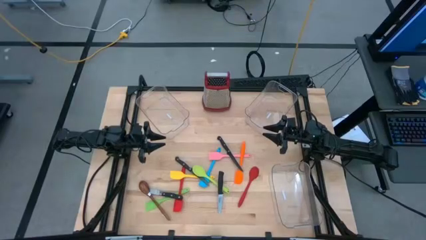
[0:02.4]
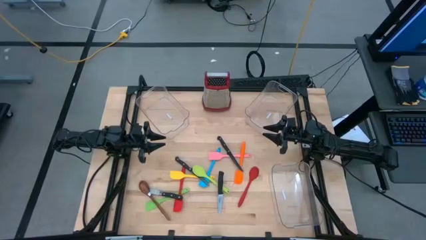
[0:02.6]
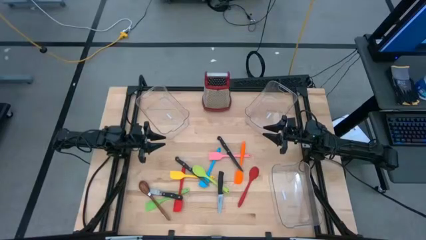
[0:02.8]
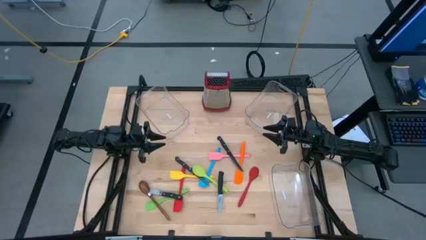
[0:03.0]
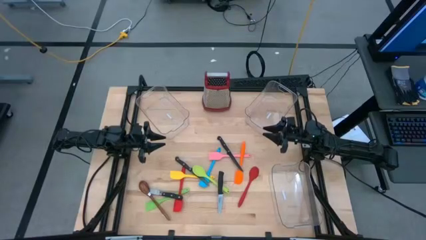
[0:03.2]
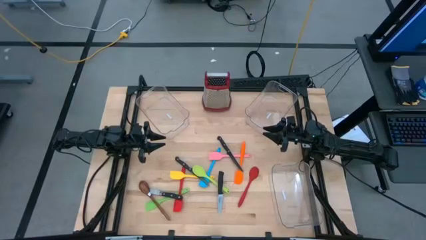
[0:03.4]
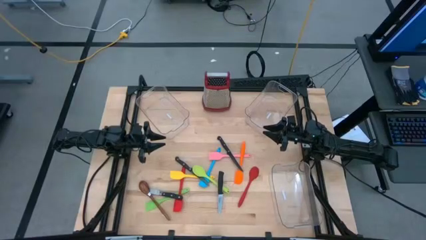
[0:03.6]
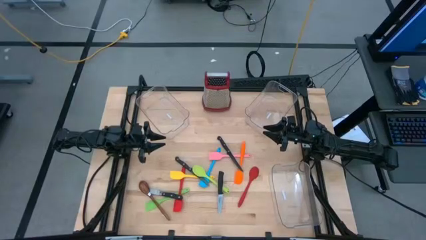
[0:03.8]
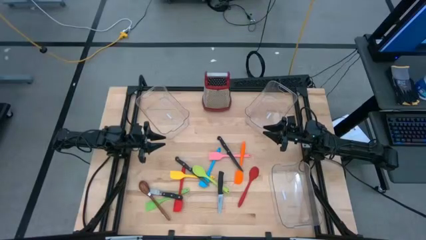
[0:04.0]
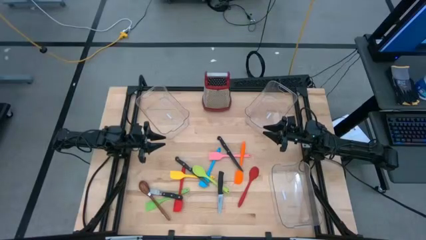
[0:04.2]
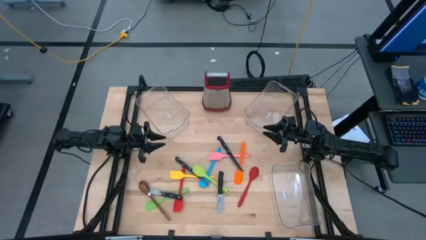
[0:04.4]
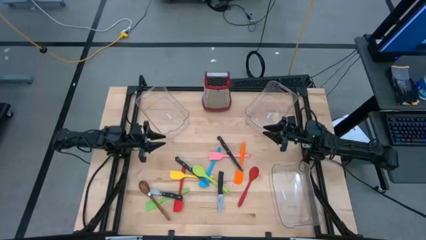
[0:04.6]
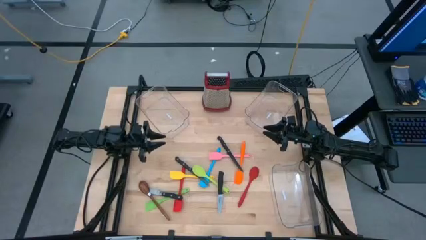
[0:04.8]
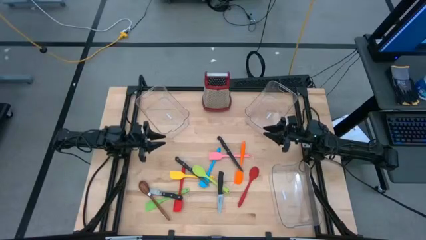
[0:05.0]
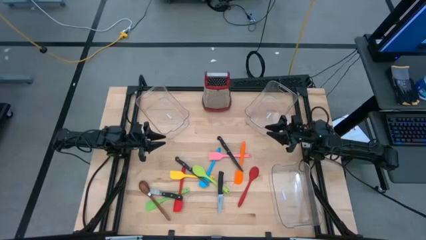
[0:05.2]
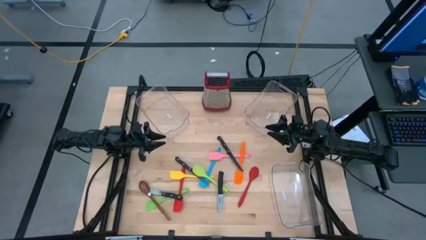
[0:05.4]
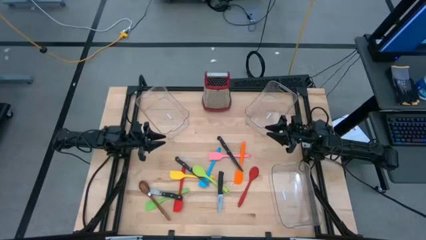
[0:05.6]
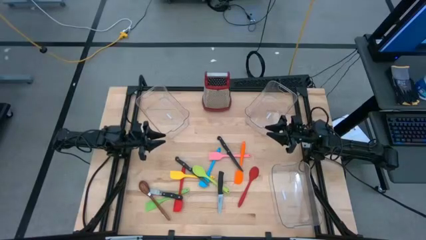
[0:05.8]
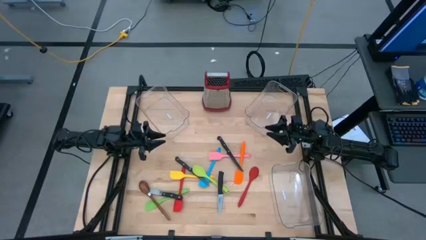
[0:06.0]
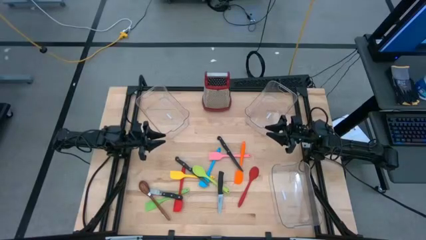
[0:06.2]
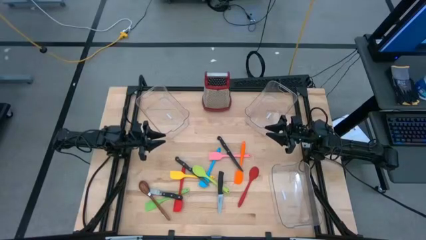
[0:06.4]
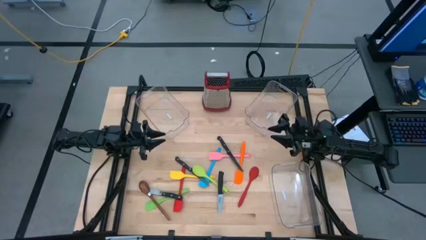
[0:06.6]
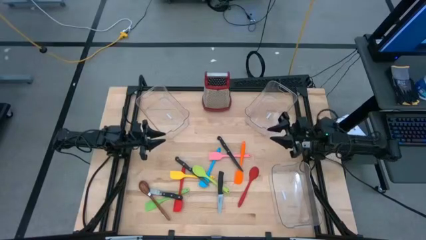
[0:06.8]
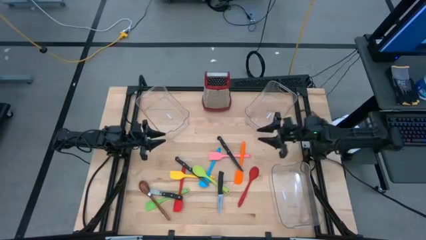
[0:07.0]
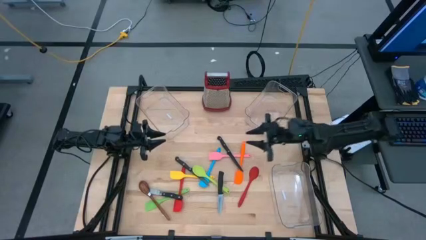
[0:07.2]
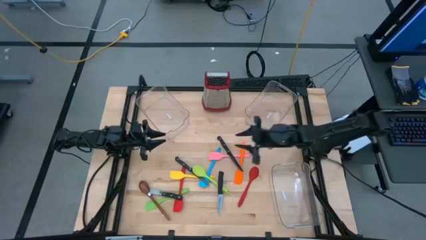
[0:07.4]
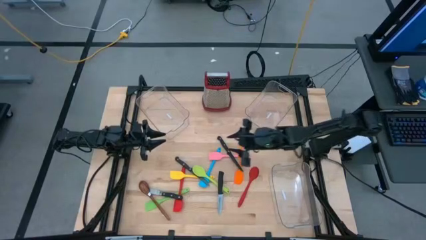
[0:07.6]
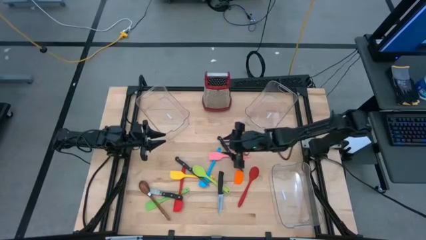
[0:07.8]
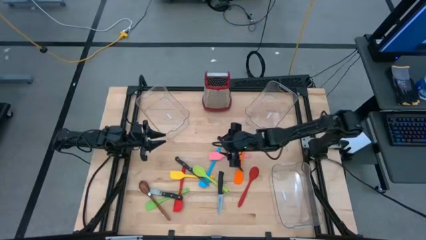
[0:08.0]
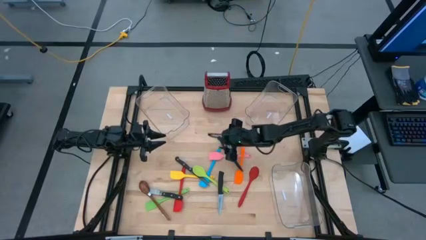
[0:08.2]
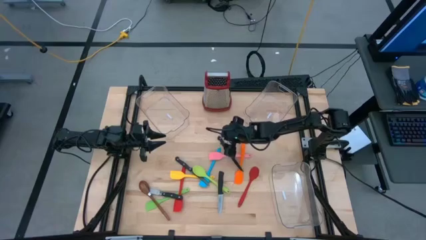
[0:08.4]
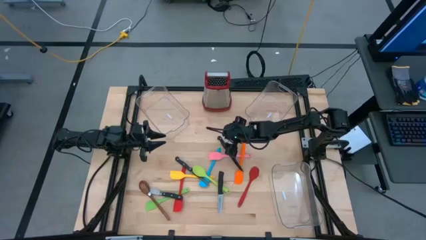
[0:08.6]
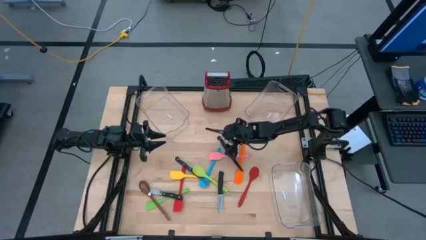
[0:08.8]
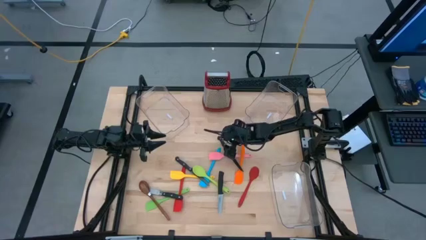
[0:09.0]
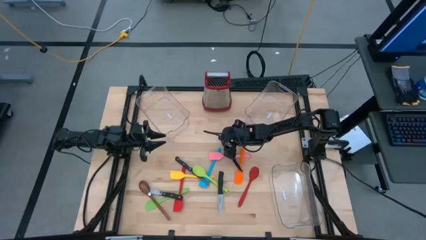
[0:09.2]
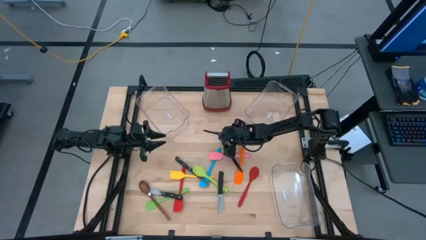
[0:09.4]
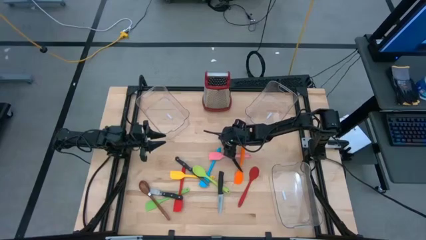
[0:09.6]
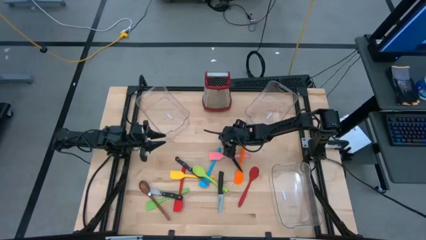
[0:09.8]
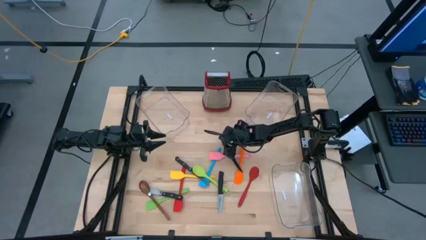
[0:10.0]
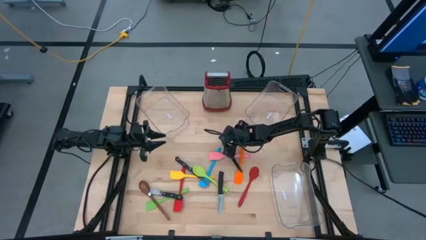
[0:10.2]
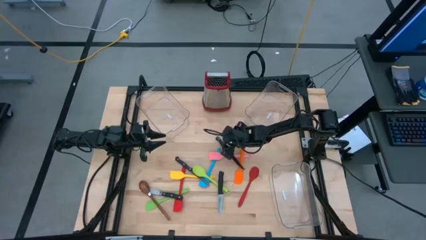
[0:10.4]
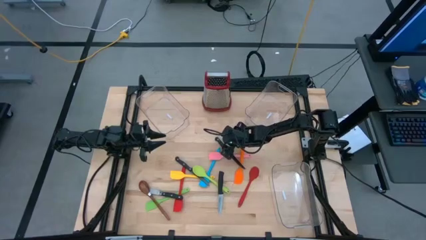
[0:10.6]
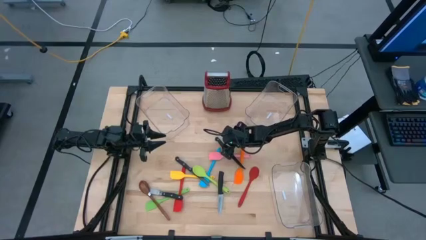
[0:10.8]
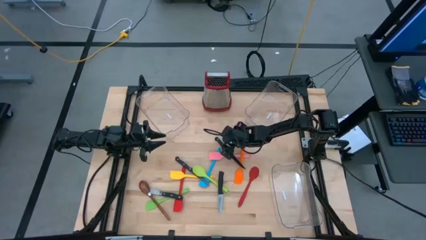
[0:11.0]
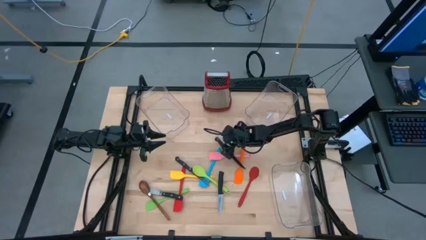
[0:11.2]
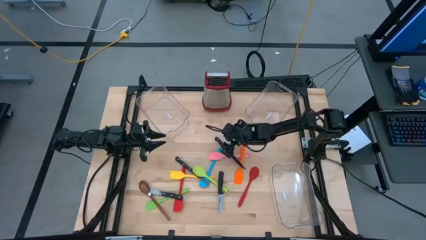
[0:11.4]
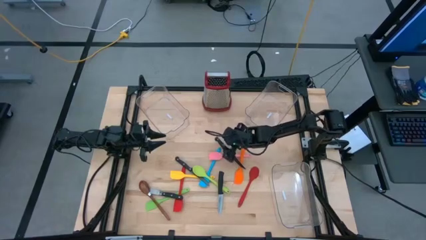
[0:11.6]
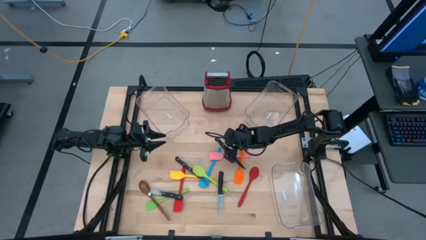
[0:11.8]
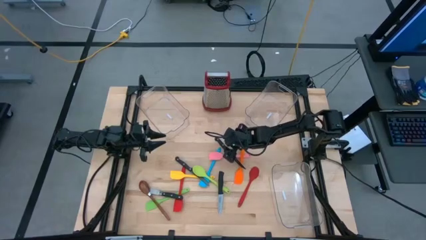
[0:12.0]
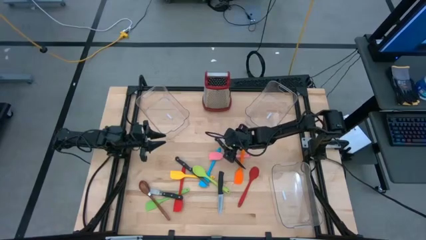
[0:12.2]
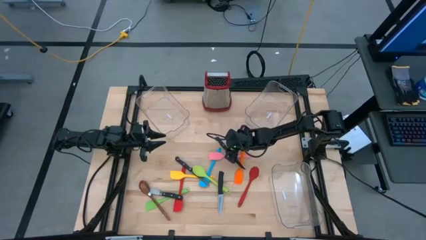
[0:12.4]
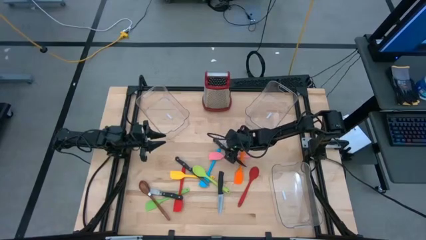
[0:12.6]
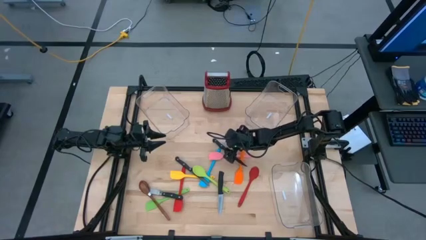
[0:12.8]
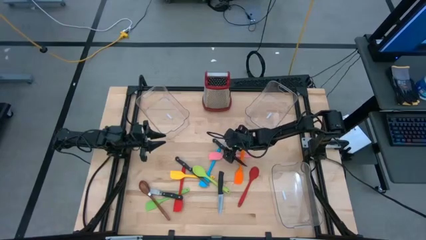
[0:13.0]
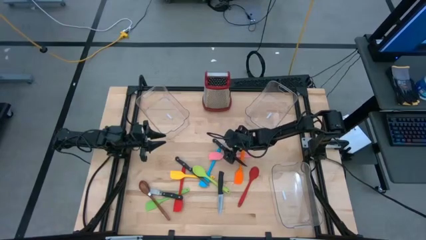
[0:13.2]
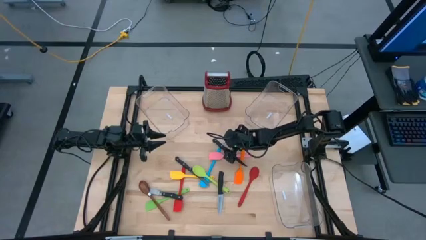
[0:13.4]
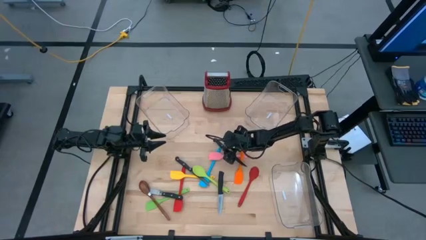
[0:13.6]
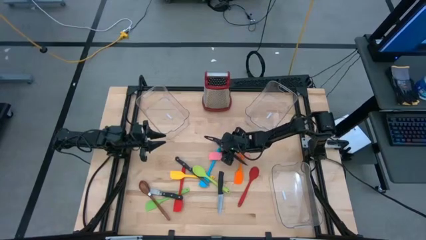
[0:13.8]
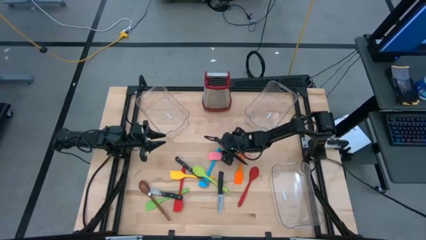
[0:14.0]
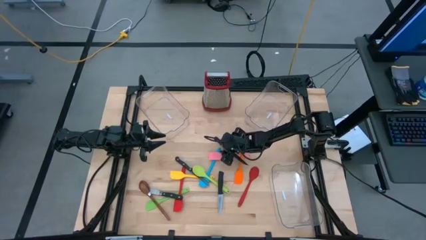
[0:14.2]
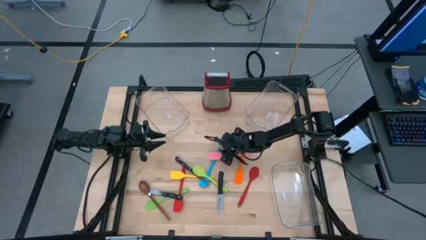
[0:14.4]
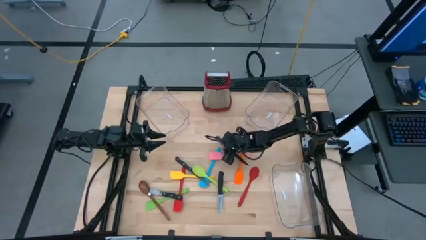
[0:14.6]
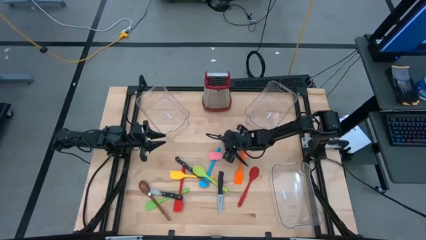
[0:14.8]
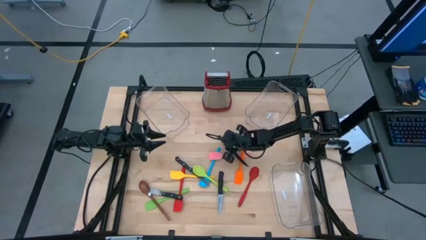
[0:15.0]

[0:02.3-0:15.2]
Task: Pick & Place Kitchen Items
Put the right black knife into the top left transparent bin
